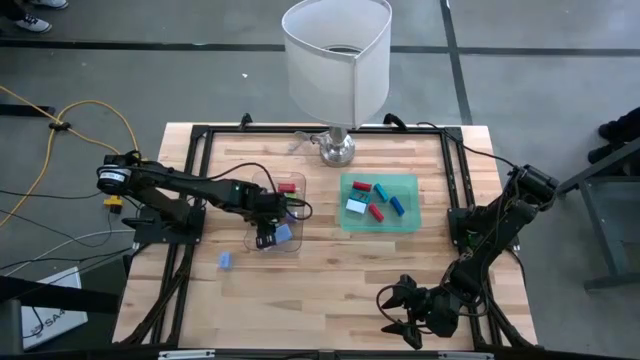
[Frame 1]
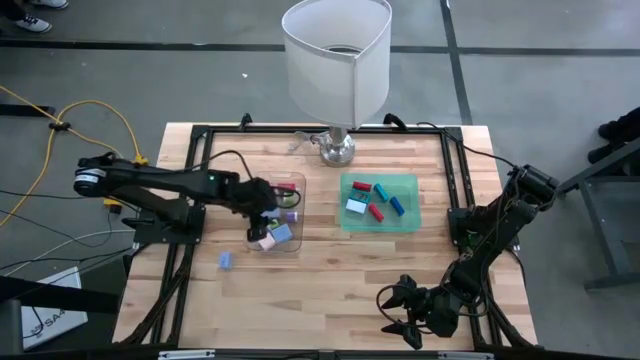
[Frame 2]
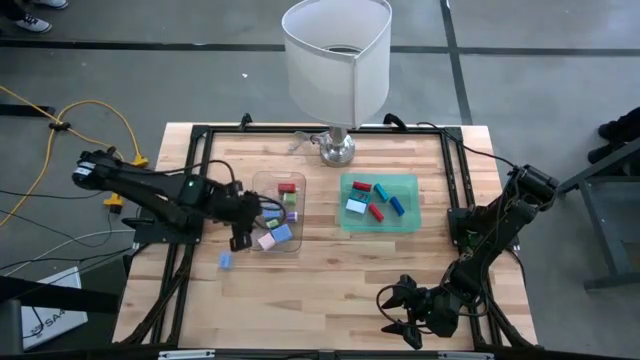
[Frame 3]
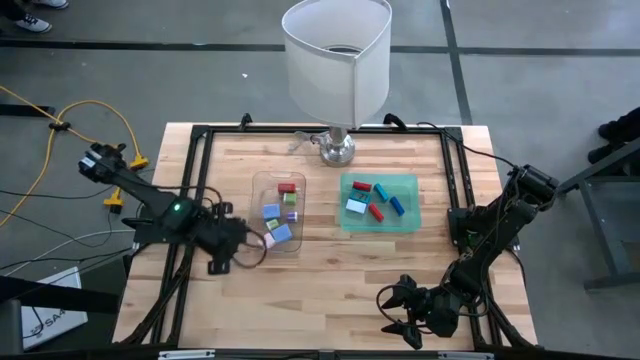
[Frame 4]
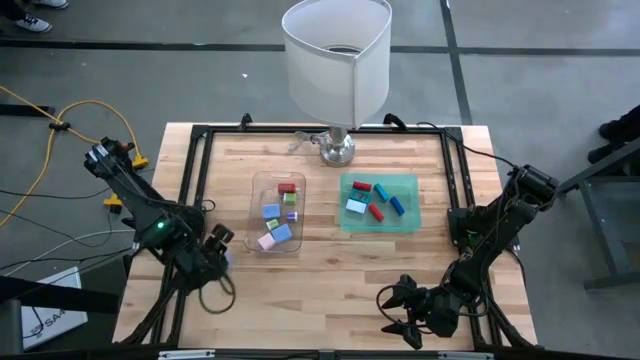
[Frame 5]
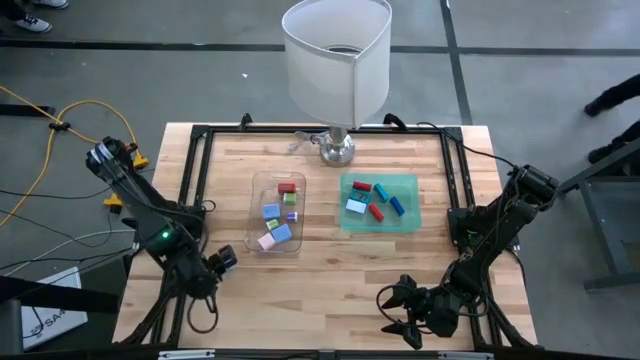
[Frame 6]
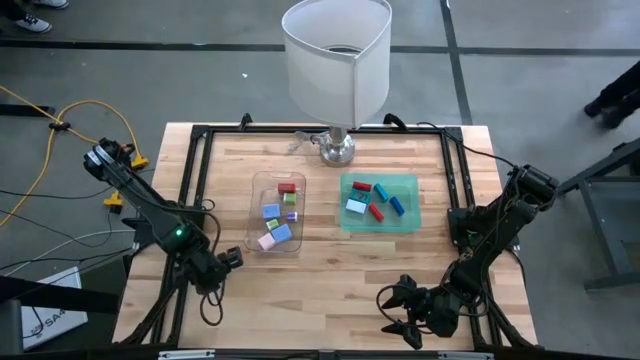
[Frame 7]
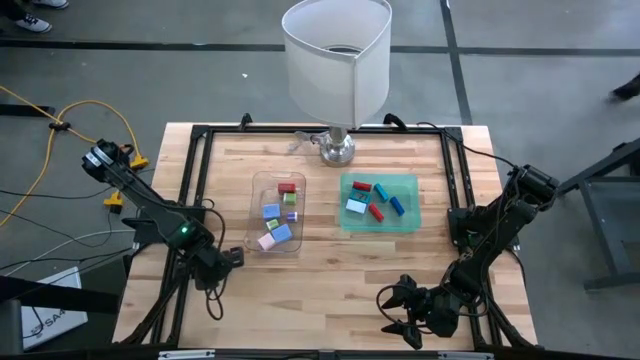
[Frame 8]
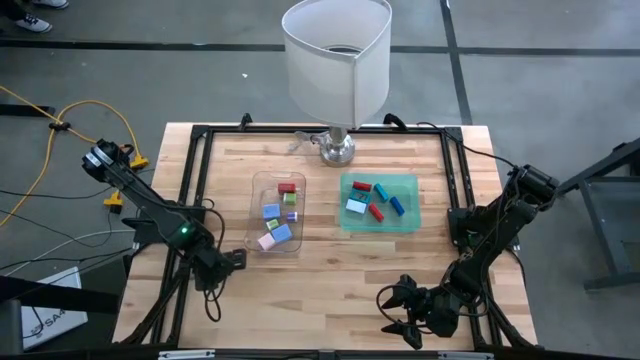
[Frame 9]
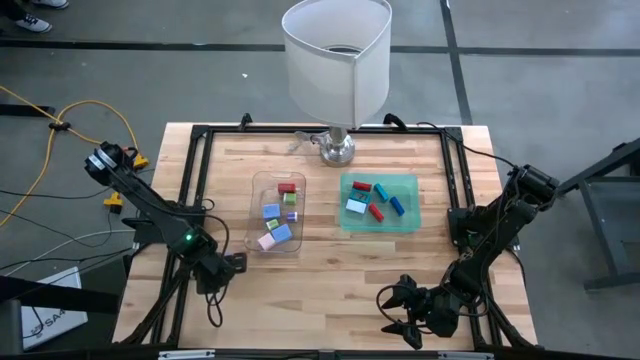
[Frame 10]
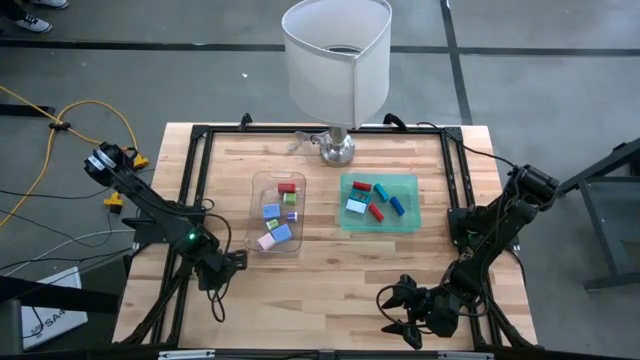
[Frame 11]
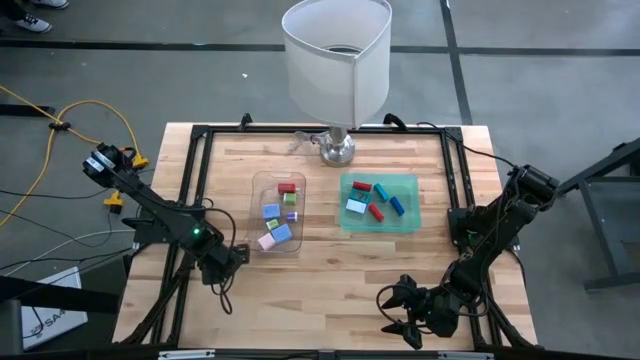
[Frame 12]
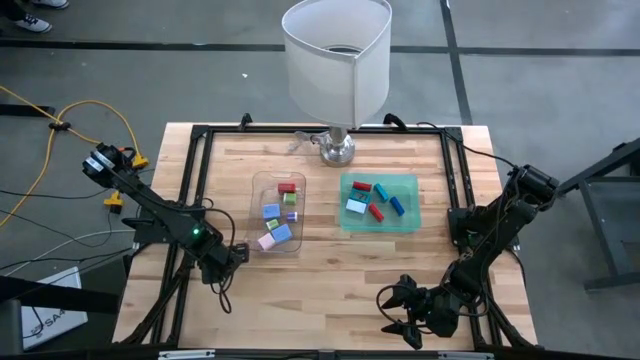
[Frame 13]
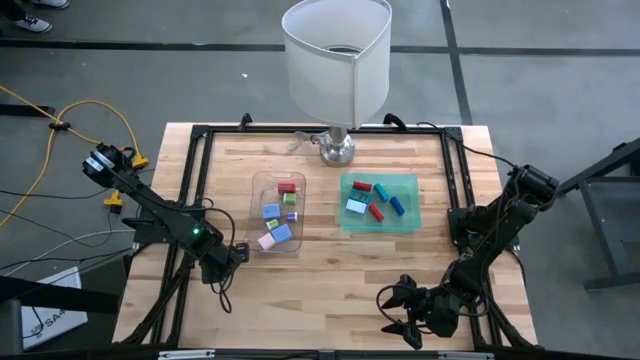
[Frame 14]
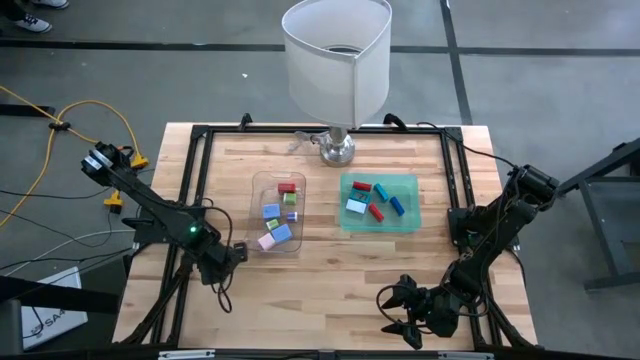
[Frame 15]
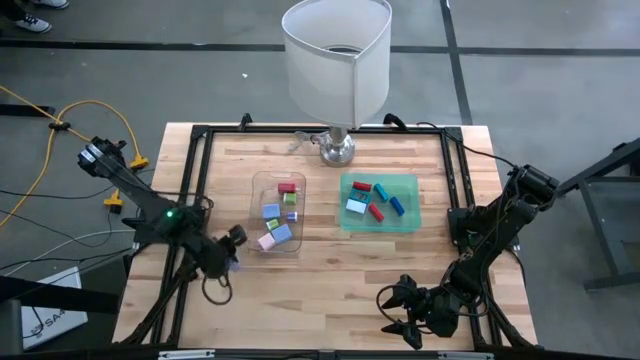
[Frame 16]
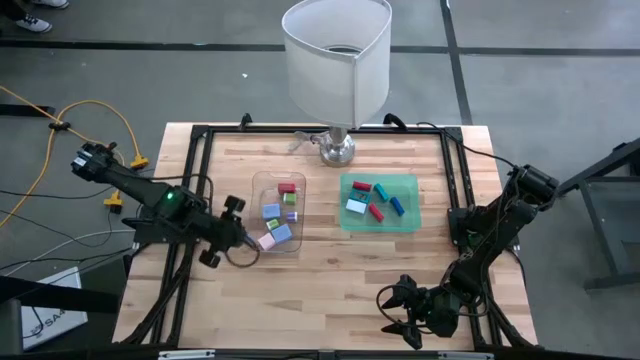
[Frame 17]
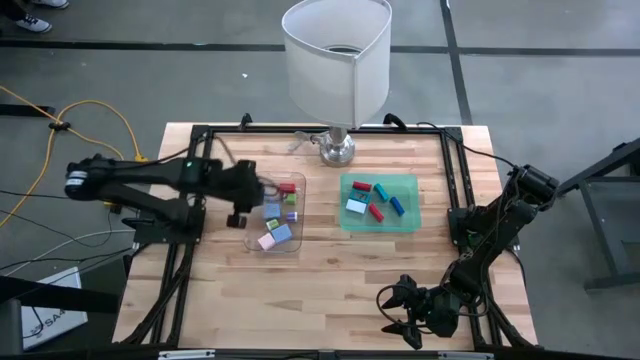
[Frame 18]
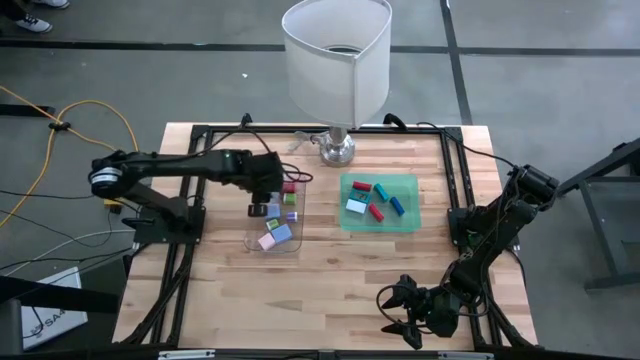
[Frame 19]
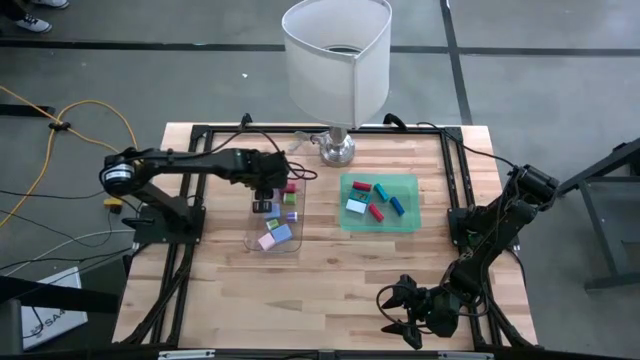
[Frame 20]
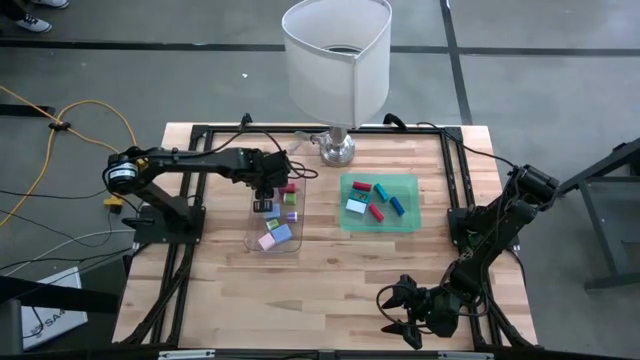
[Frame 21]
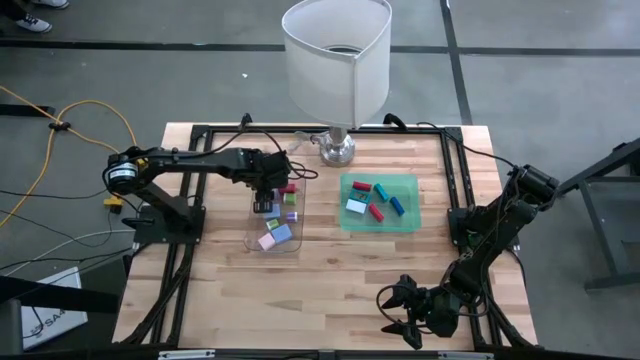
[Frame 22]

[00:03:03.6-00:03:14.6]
Task: Pick & Place Office items
Put the blue charger adapter into the transparent bin

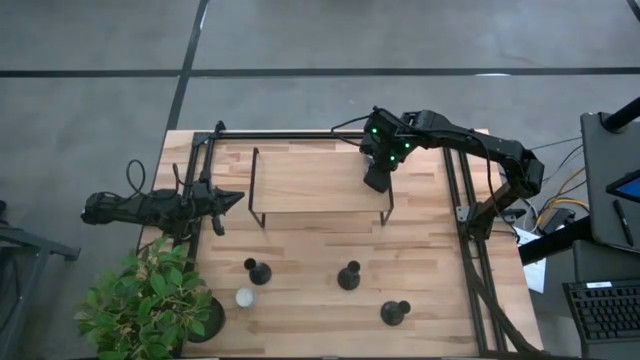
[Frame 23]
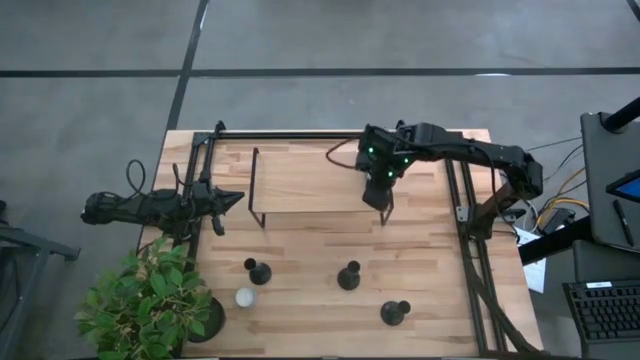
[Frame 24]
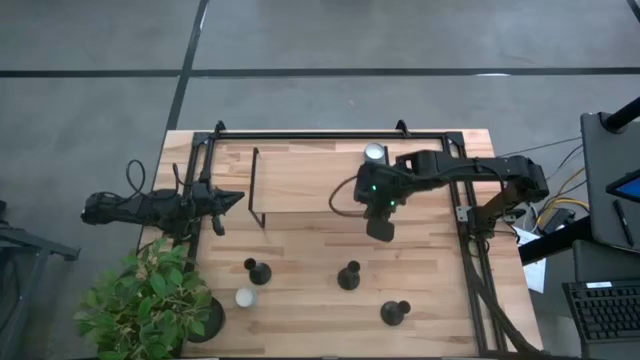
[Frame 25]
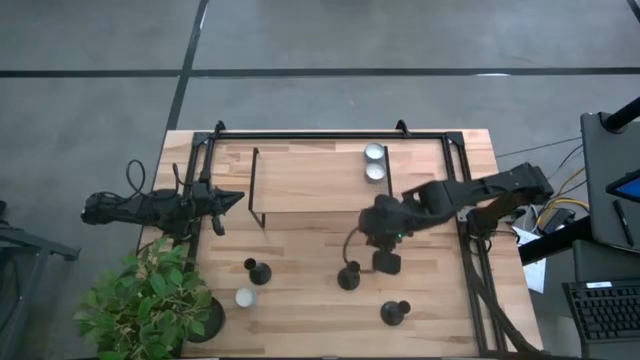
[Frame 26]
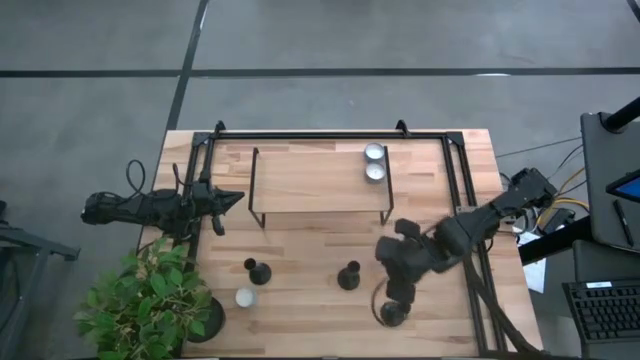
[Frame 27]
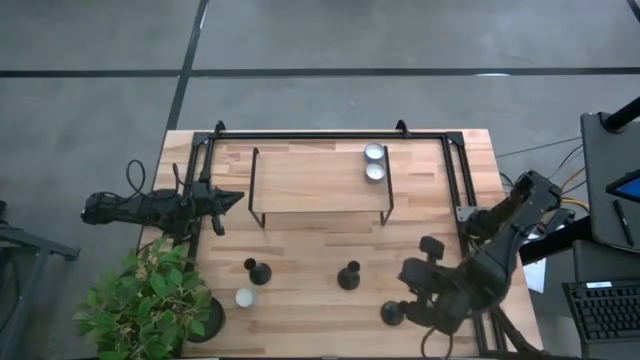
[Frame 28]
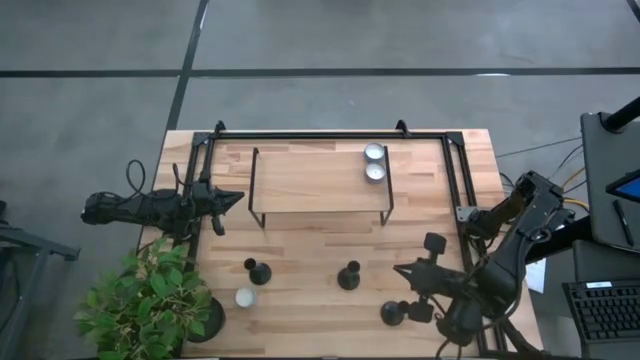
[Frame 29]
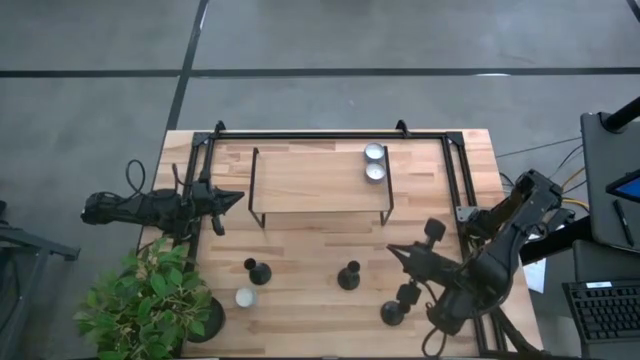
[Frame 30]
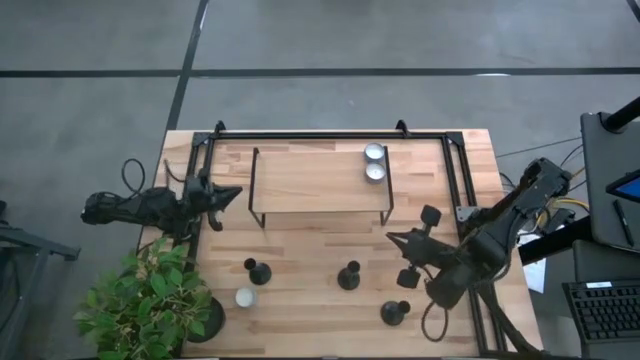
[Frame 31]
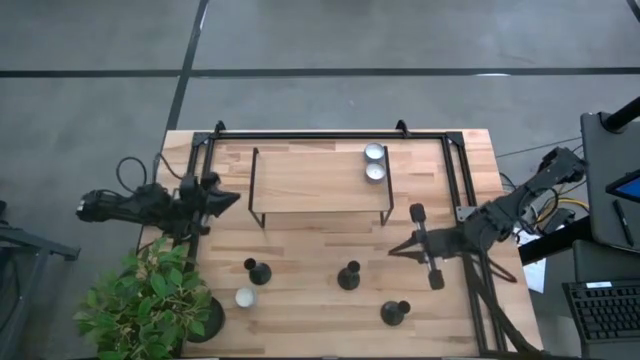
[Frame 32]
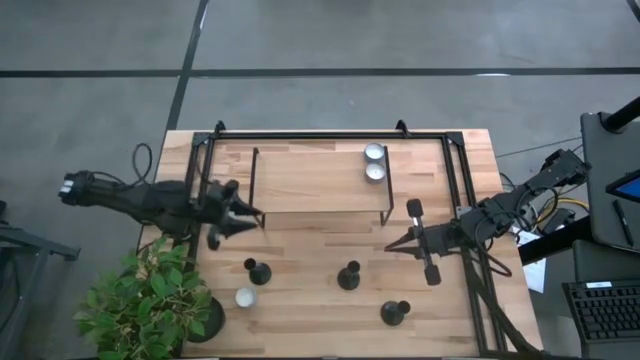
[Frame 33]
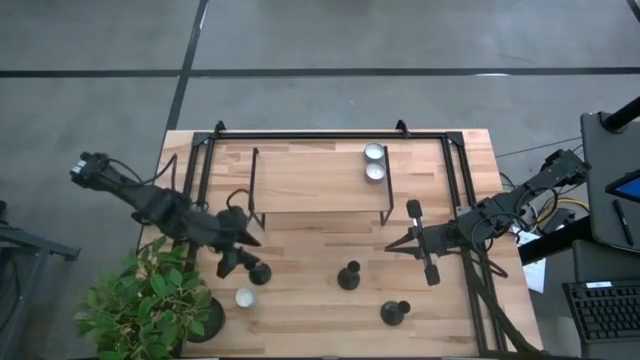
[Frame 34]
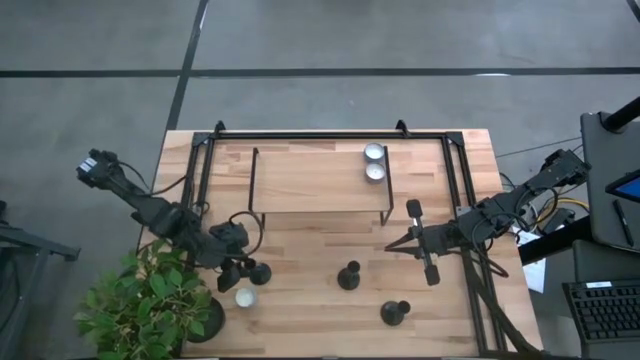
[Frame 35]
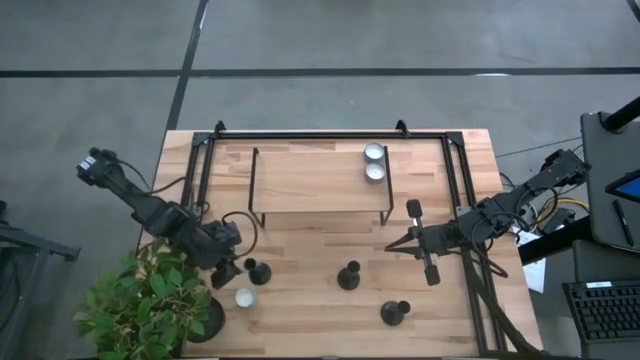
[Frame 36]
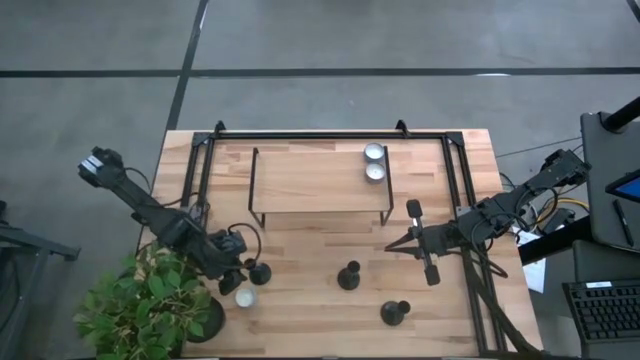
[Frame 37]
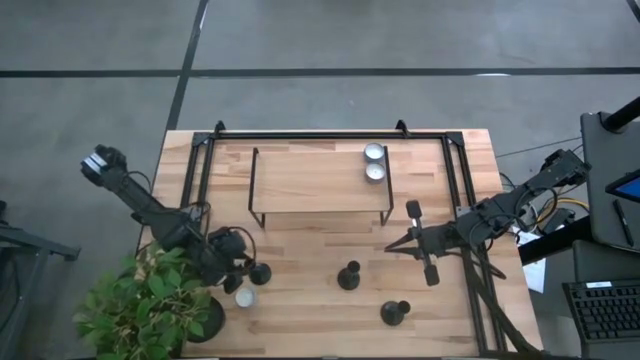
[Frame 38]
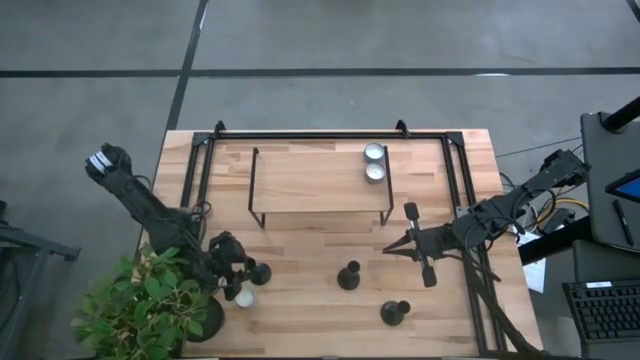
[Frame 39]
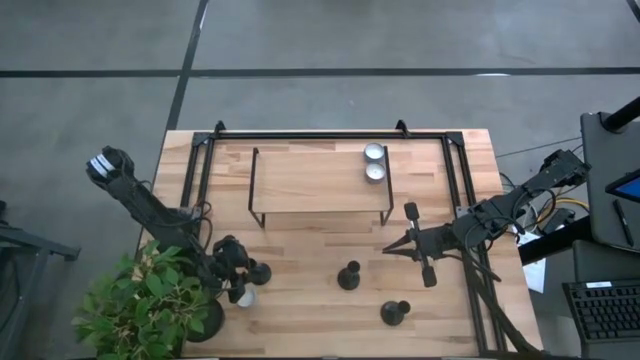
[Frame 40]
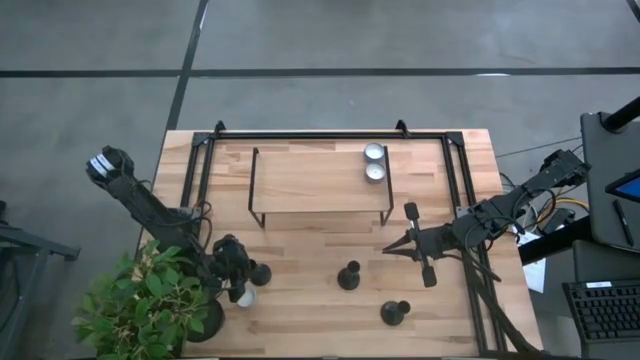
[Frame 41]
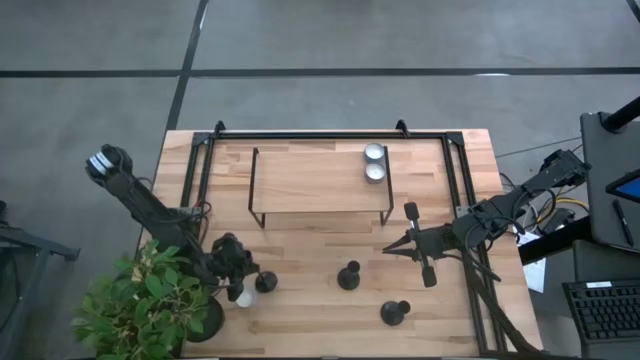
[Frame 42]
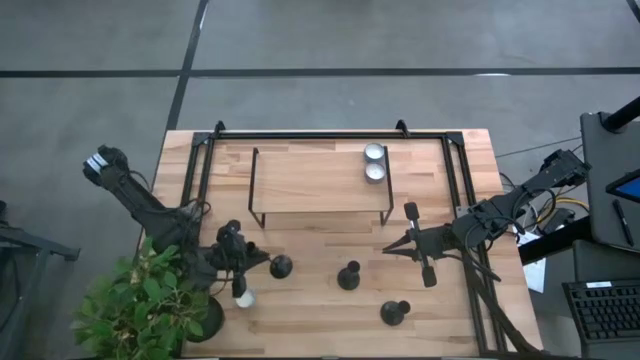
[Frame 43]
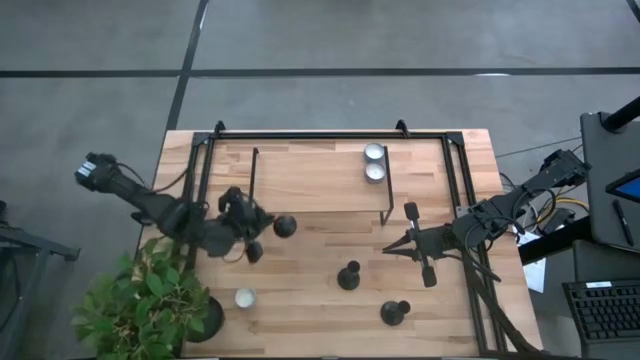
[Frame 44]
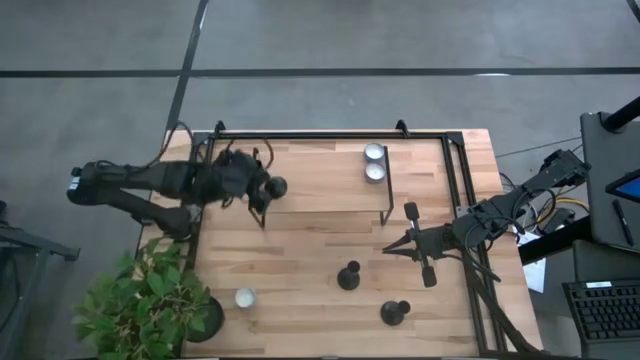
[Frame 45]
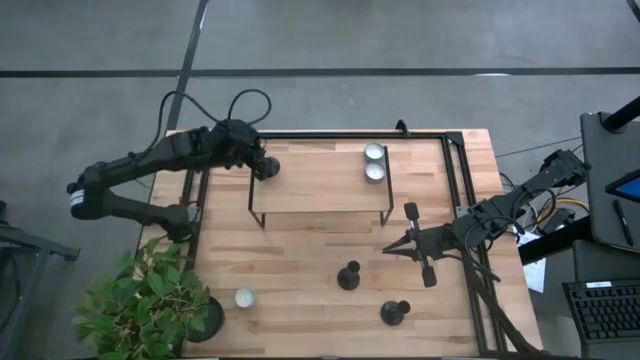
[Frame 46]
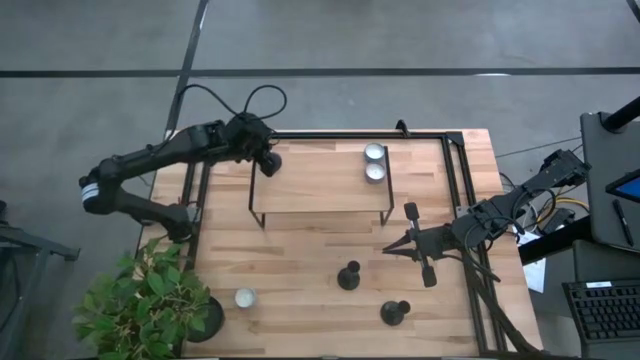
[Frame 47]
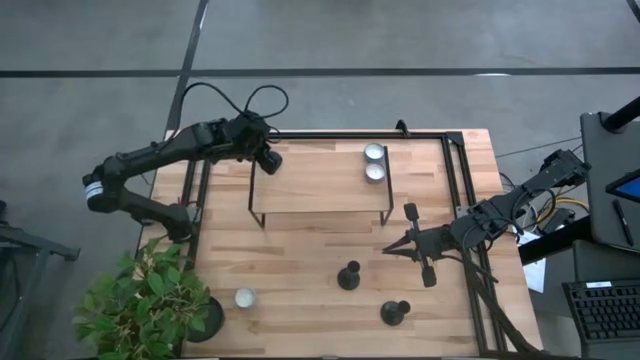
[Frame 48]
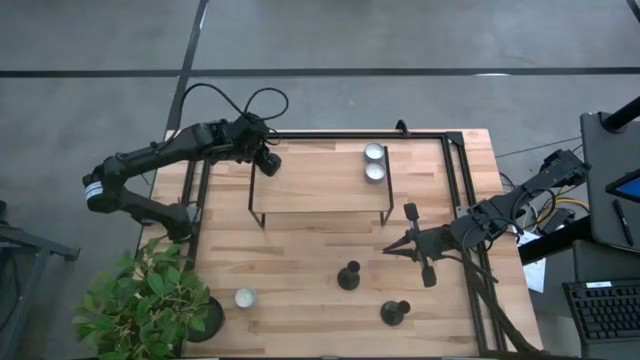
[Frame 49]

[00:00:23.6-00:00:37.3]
Task: Pick & Place candle stick holders
Put the top left black holder on the shelf
